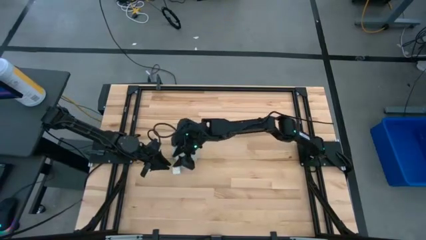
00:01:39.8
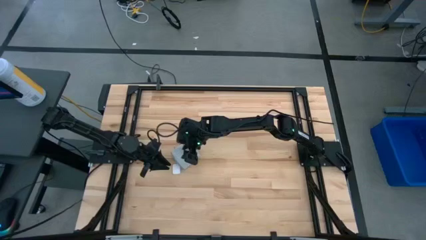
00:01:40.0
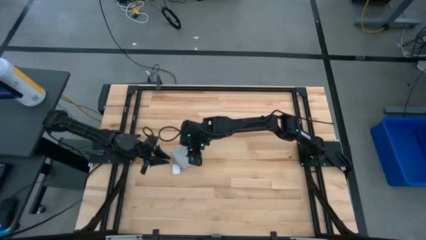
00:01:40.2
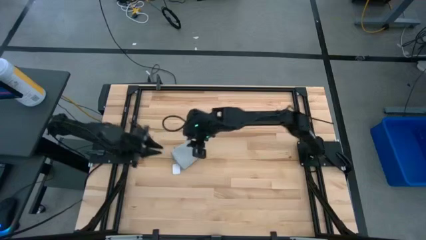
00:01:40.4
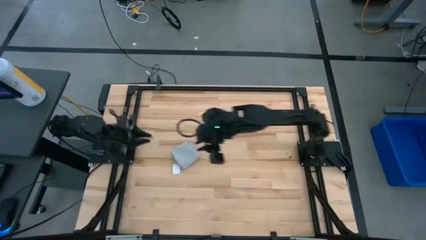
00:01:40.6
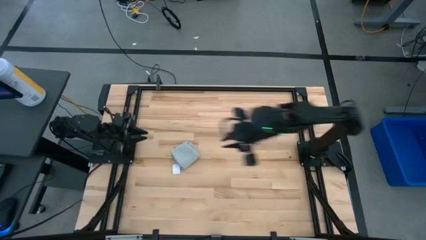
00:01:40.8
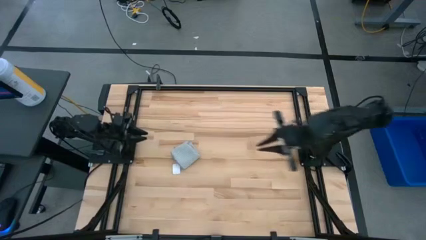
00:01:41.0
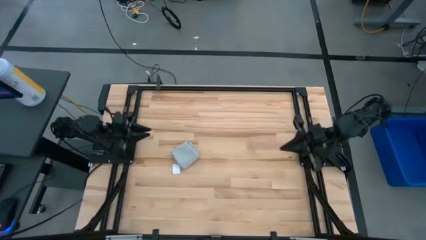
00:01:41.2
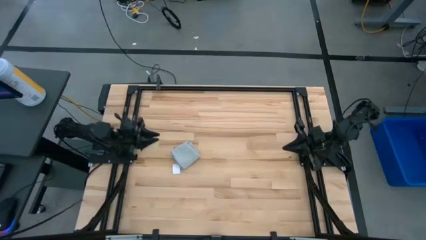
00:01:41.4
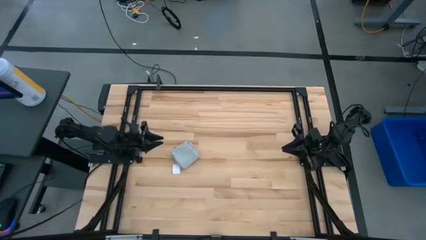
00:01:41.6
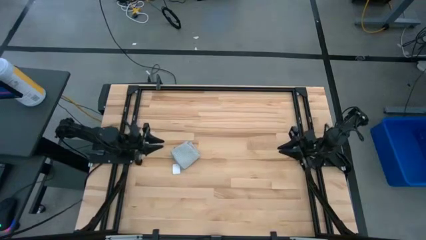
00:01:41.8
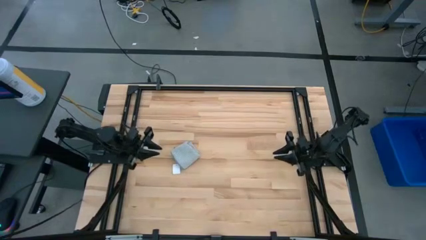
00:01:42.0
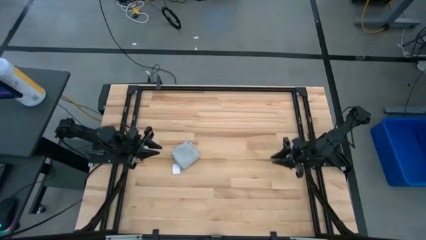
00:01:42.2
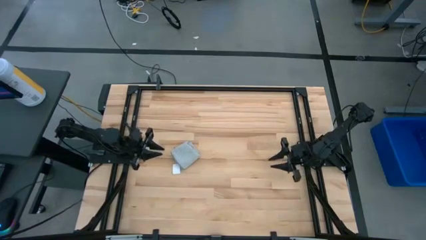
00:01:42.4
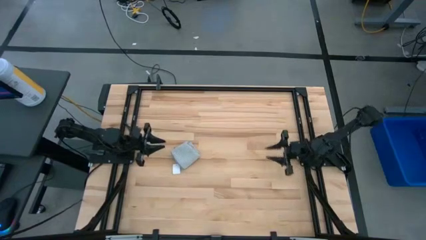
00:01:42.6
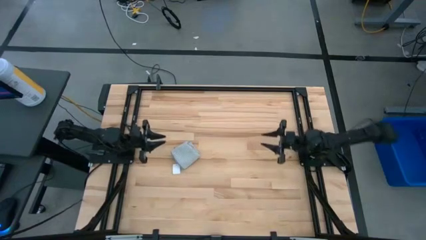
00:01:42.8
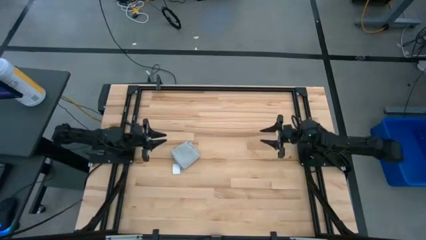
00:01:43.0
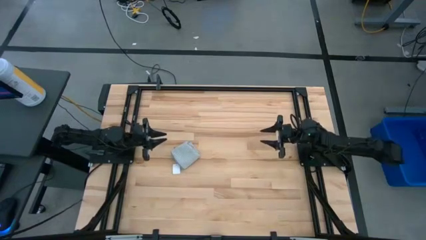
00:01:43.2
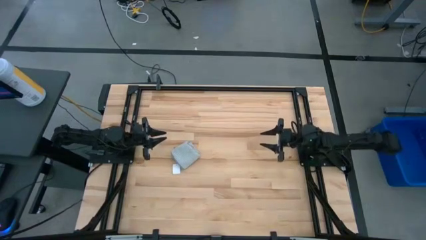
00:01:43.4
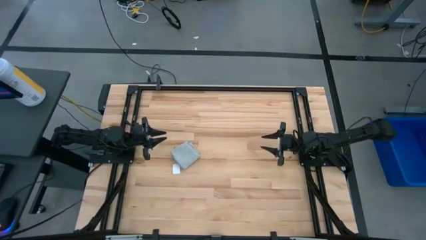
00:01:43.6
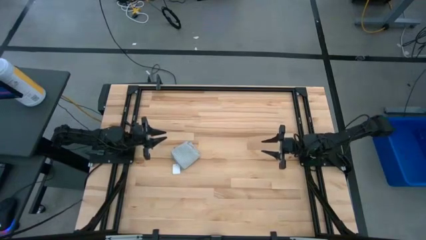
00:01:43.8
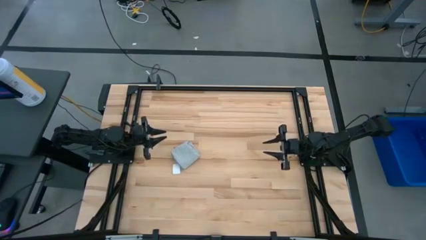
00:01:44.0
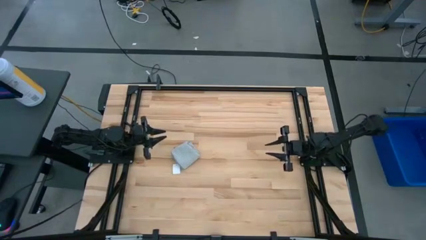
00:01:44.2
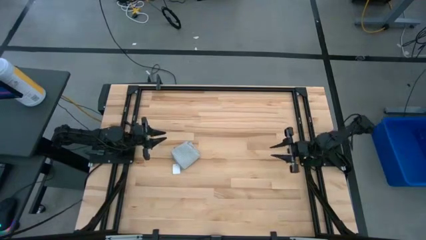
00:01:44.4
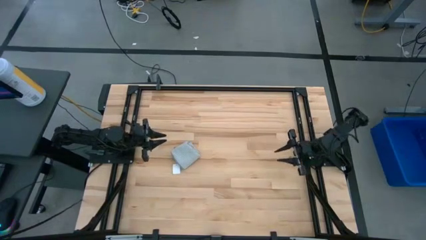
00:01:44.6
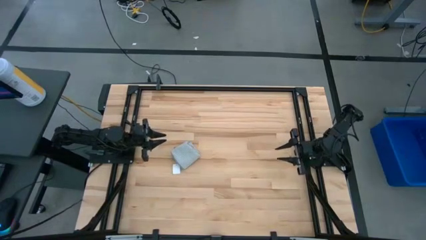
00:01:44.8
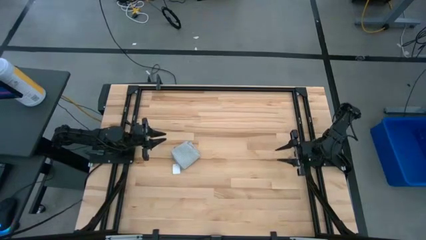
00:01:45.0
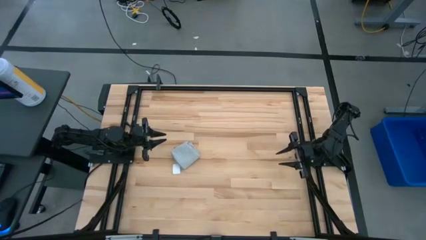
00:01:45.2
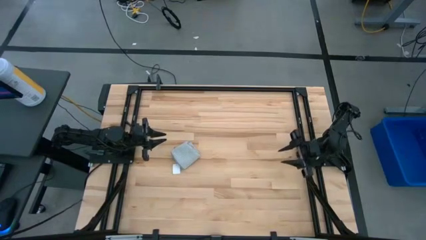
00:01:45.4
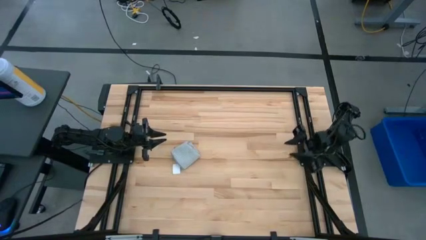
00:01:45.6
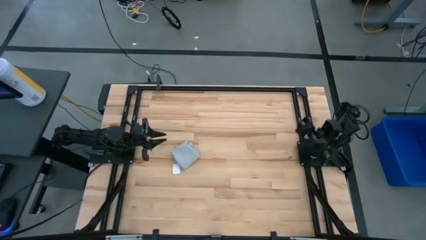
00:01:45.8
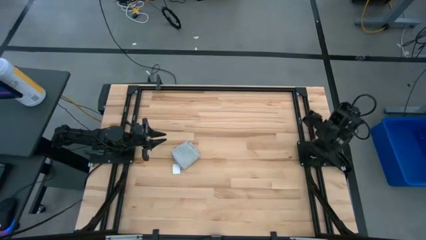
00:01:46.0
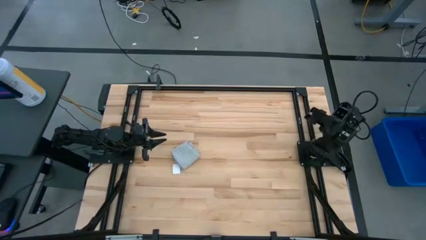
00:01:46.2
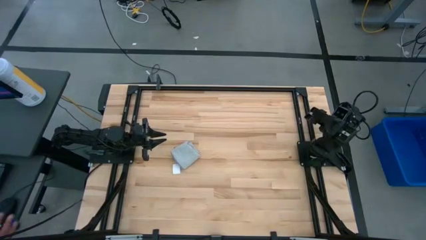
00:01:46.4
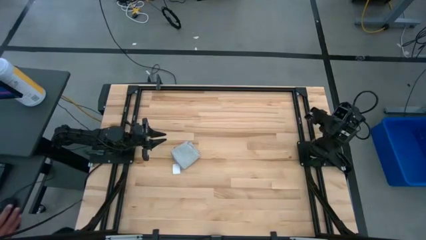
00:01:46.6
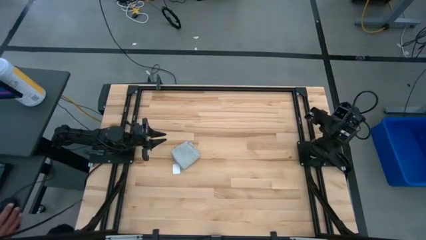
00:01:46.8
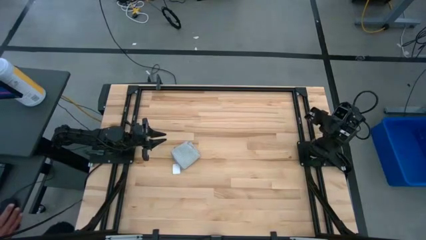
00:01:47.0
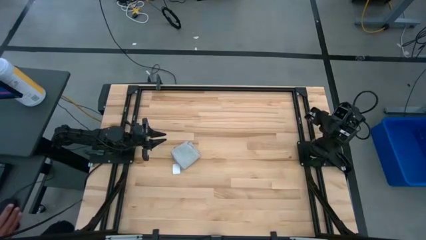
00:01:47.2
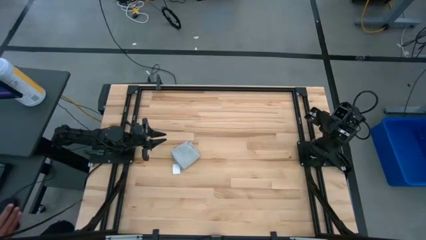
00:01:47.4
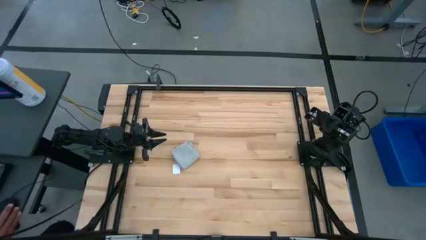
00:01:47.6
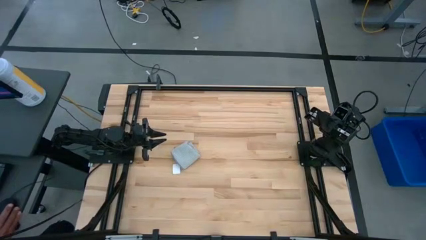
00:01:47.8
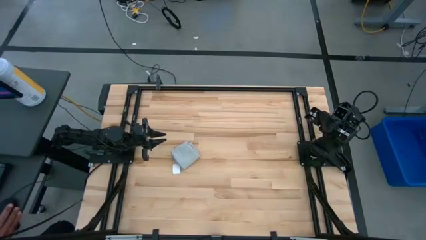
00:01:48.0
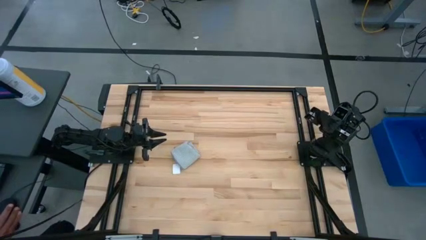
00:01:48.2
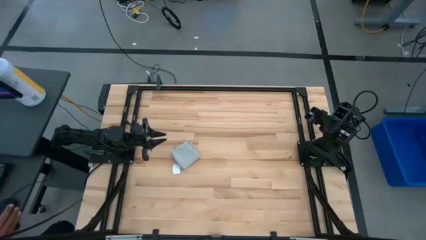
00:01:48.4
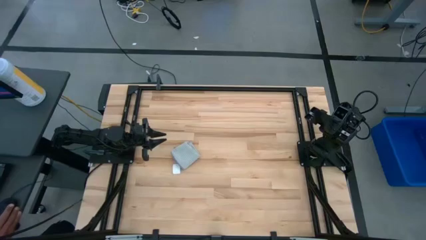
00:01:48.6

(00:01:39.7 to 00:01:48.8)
Task: Fold microfiber towels
Return to Home Position

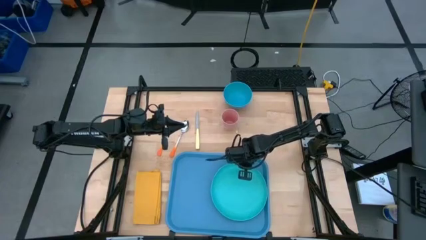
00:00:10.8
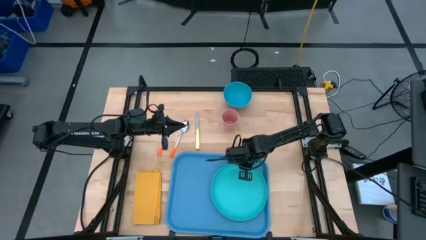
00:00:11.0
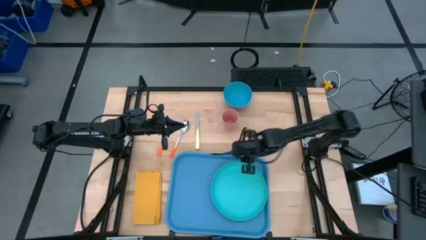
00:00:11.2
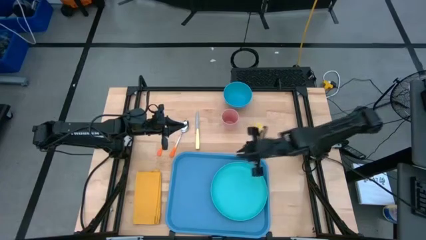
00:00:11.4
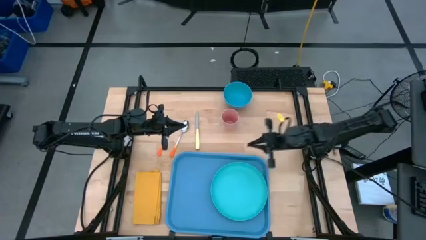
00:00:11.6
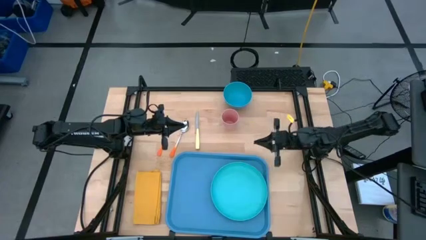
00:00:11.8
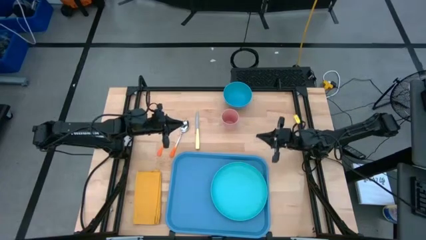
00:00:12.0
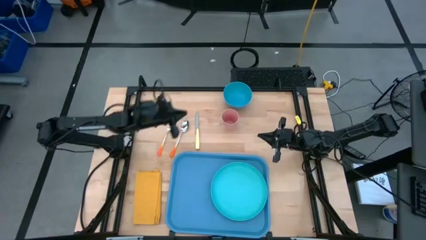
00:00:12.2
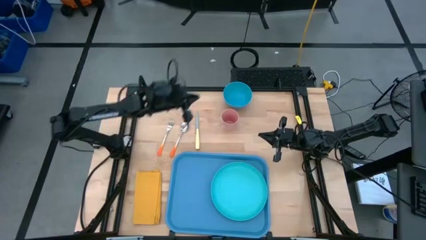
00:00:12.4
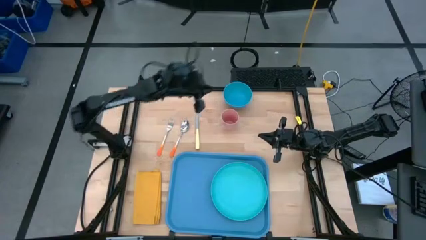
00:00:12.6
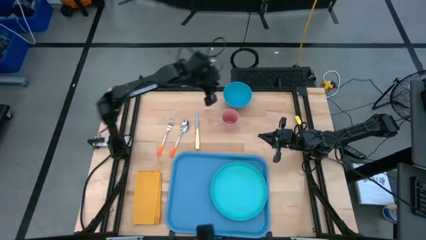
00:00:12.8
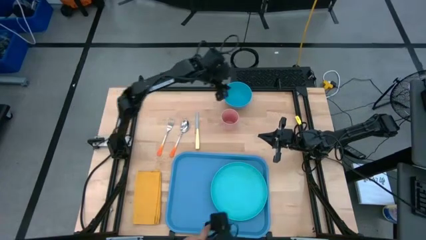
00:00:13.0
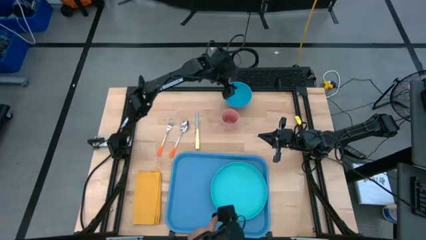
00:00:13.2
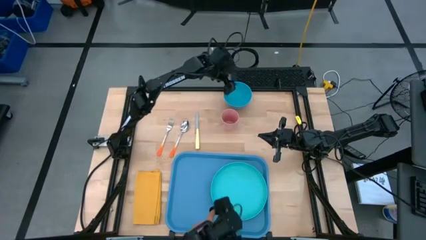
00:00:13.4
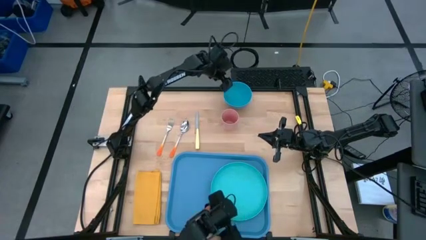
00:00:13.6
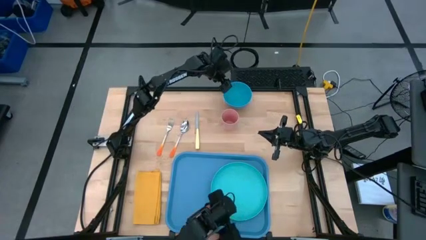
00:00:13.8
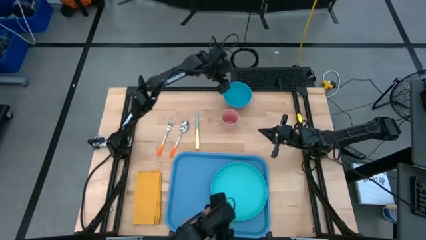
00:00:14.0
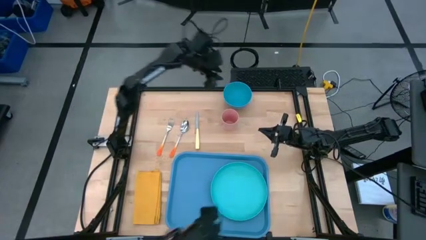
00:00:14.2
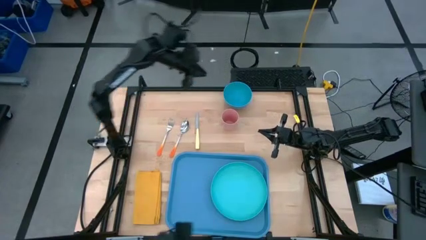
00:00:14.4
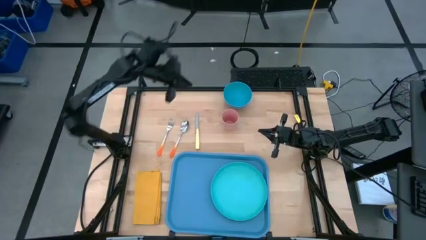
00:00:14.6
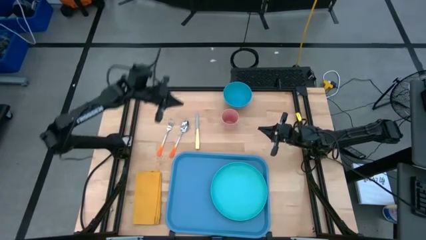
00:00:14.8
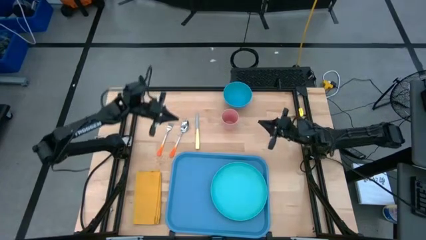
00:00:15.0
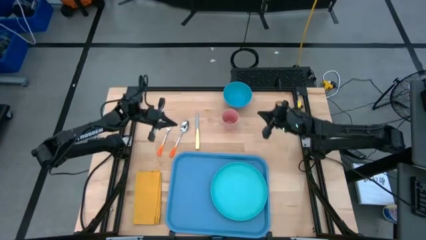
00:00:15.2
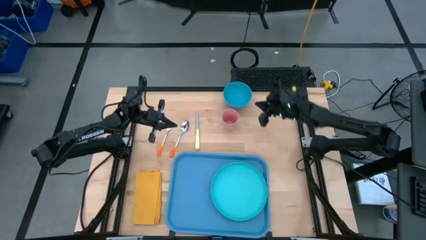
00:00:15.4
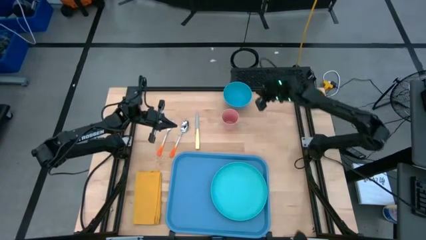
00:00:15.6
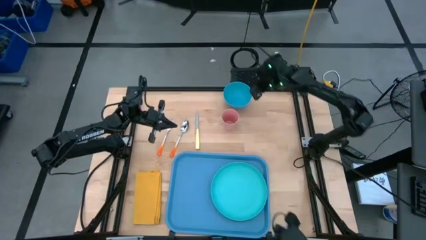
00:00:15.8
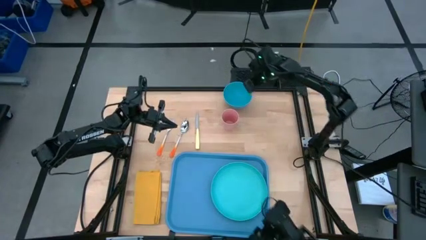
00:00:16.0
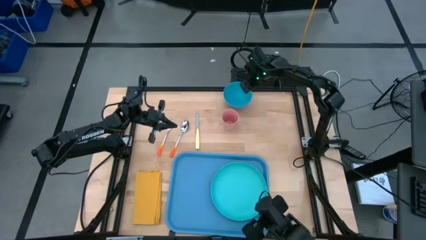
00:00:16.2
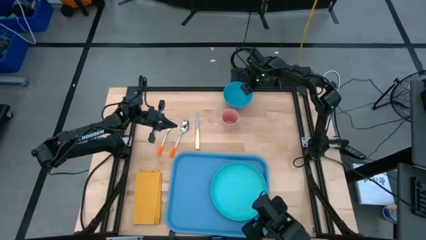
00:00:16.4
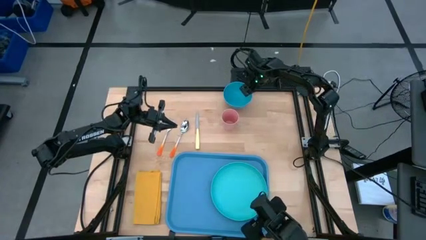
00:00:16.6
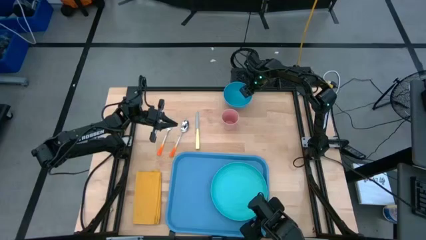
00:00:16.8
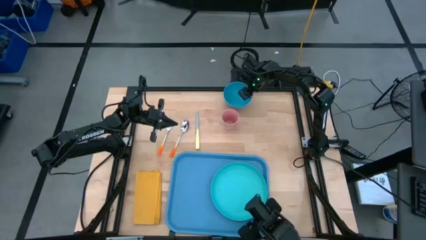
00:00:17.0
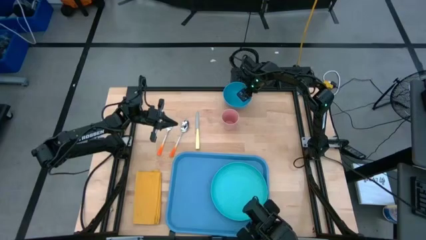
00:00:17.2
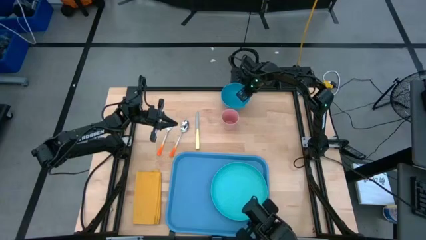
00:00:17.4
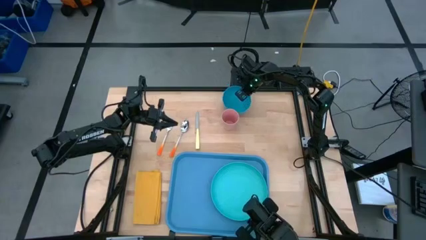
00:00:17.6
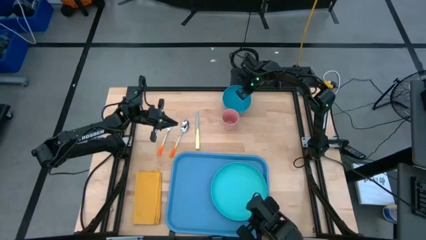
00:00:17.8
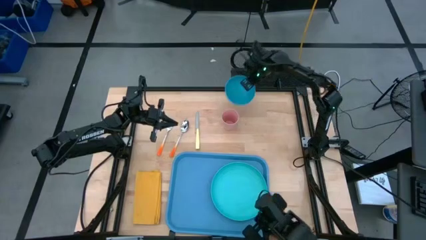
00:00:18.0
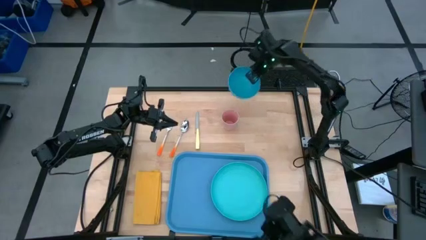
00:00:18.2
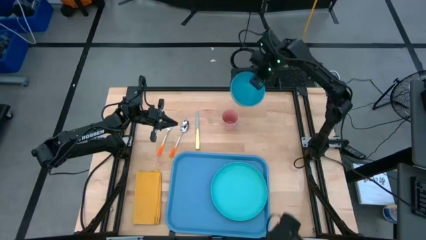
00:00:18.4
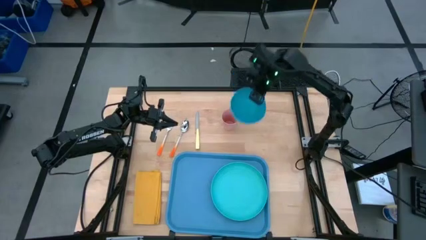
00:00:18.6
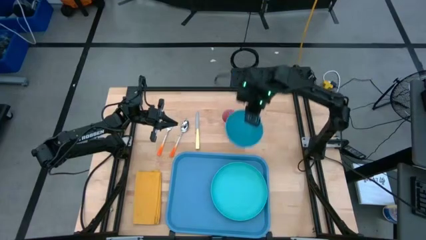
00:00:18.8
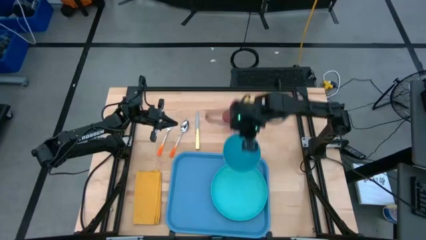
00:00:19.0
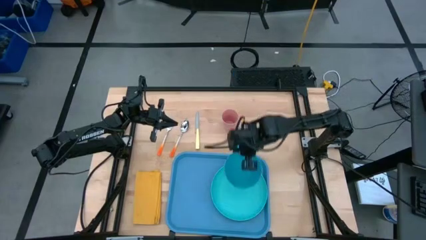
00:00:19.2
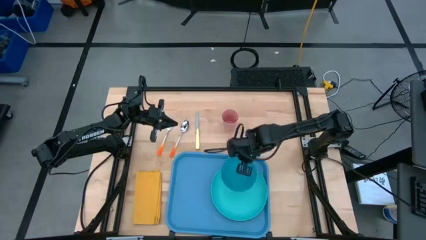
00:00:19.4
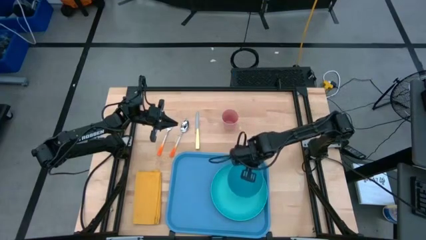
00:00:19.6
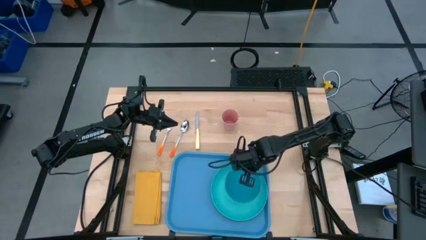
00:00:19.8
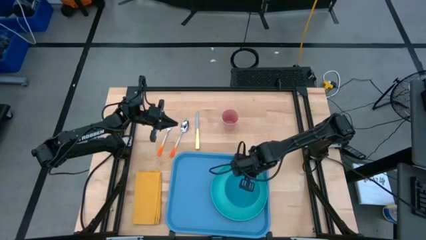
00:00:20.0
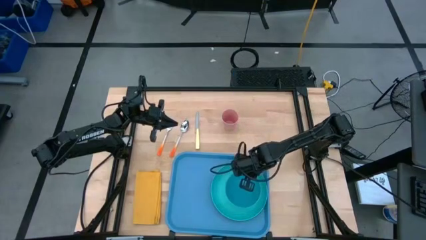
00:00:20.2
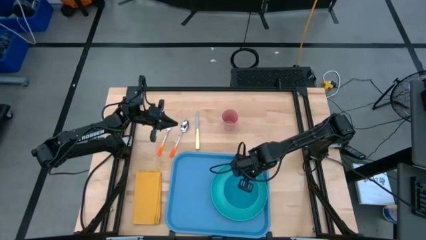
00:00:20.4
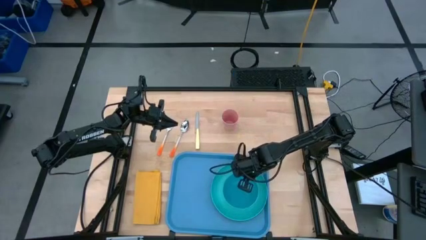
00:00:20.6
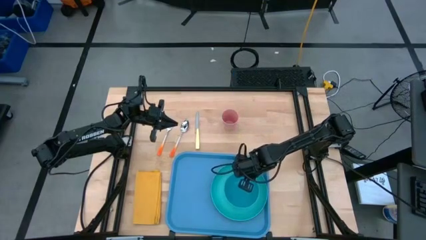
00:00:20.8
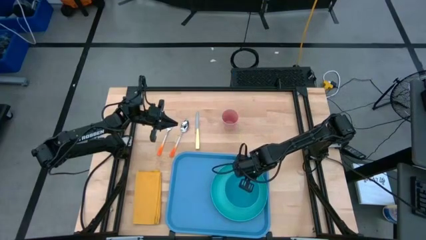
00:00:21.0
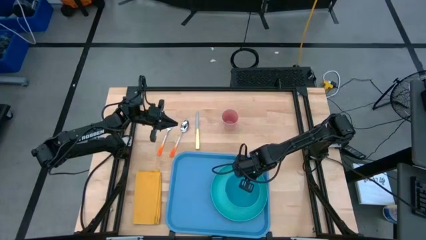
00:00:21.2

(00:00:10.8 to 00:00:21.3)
Task: Set up tray
Put the blue bowl on the green plate on the blue serving tray
